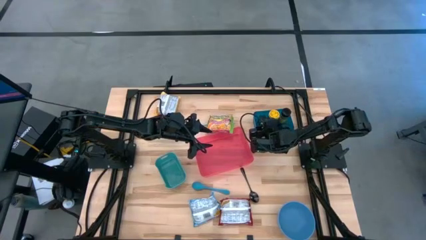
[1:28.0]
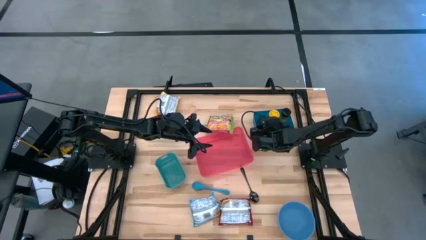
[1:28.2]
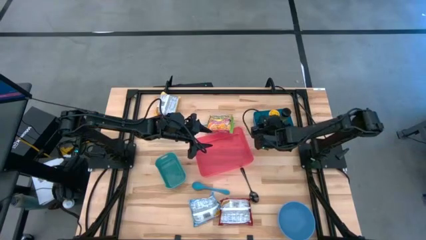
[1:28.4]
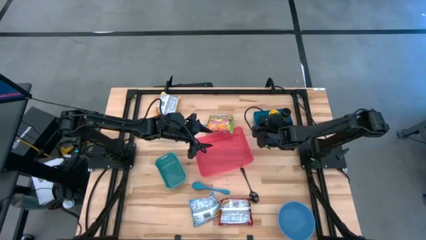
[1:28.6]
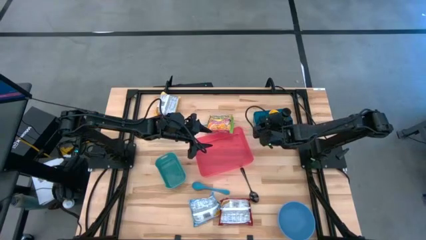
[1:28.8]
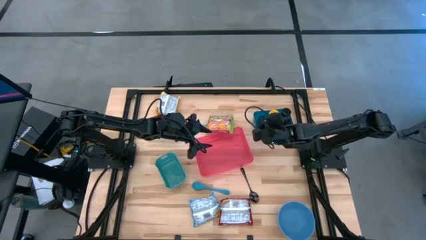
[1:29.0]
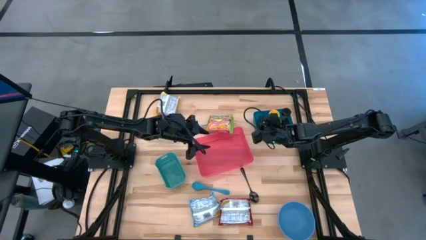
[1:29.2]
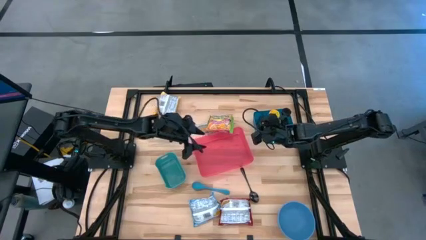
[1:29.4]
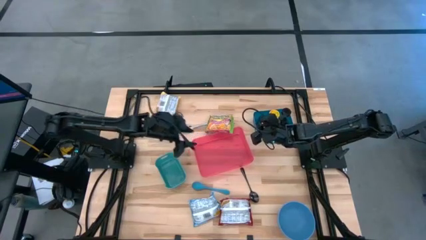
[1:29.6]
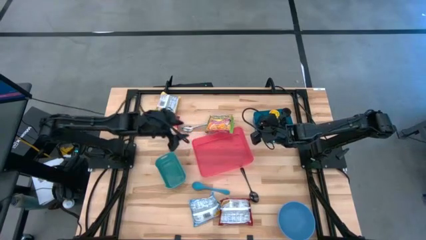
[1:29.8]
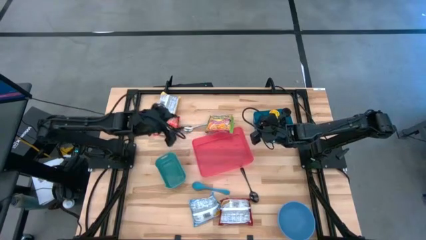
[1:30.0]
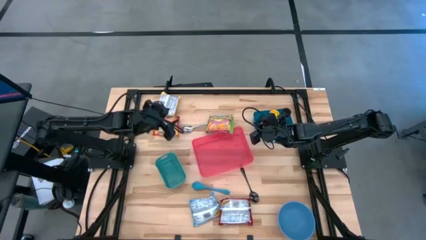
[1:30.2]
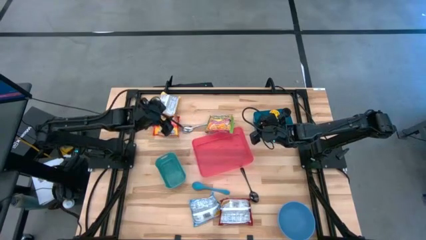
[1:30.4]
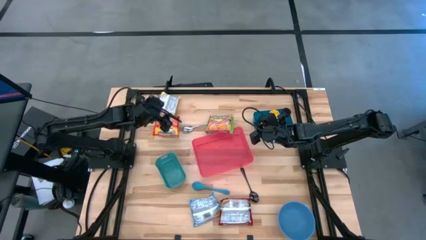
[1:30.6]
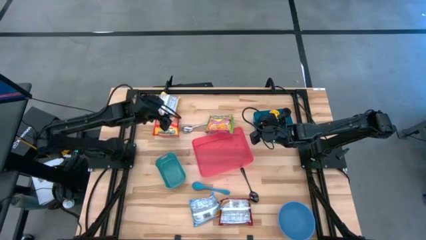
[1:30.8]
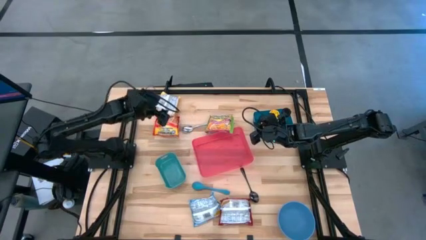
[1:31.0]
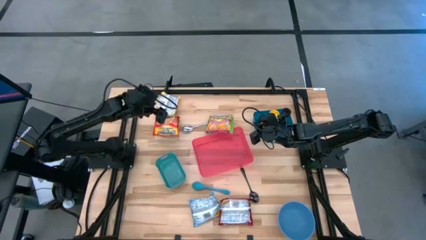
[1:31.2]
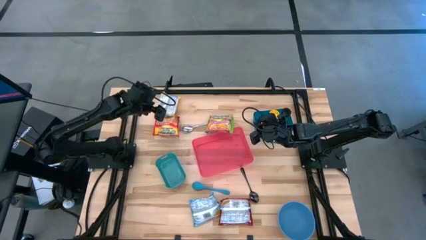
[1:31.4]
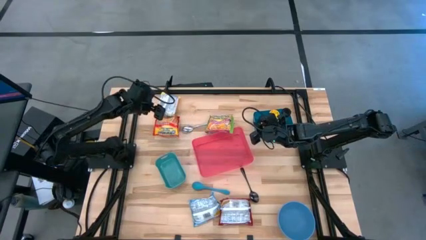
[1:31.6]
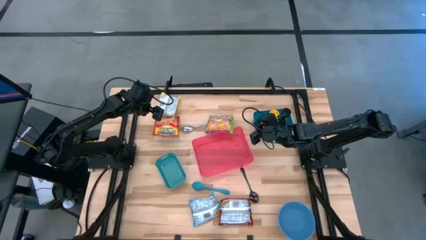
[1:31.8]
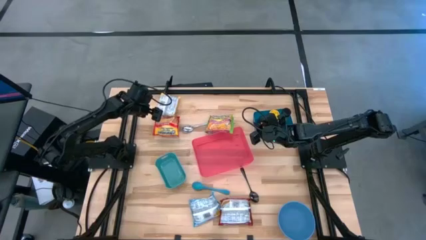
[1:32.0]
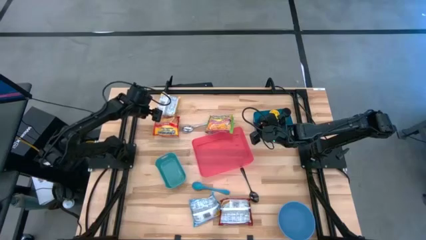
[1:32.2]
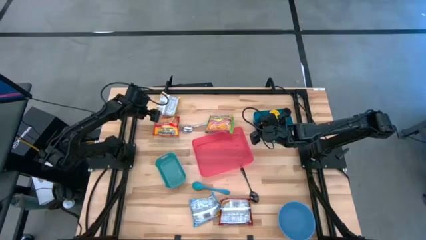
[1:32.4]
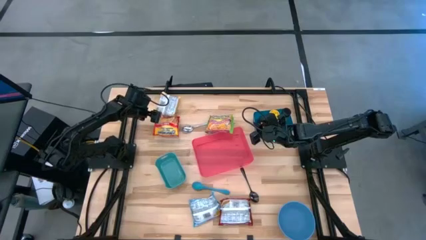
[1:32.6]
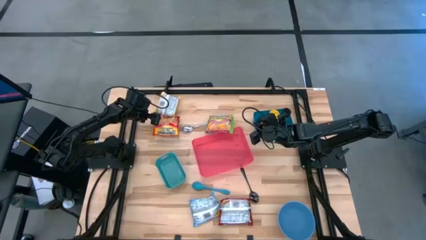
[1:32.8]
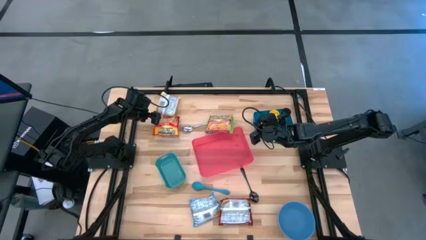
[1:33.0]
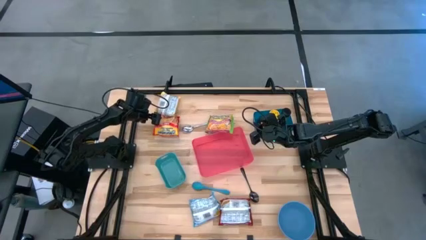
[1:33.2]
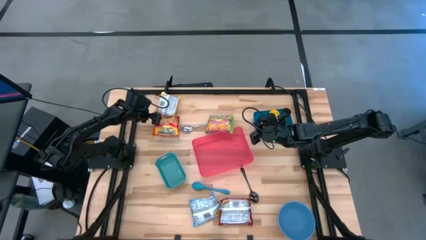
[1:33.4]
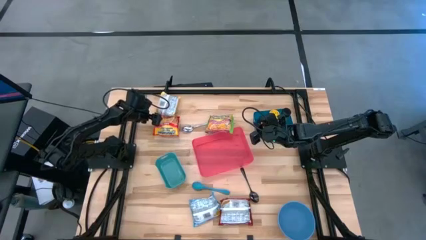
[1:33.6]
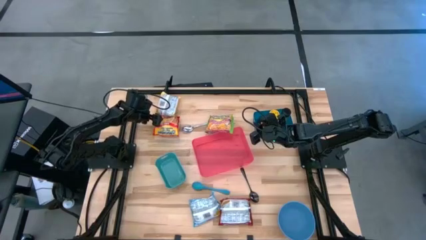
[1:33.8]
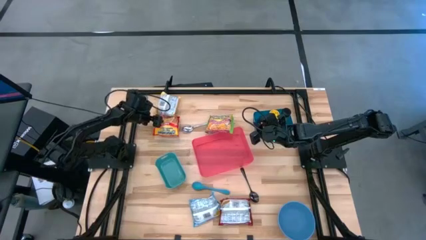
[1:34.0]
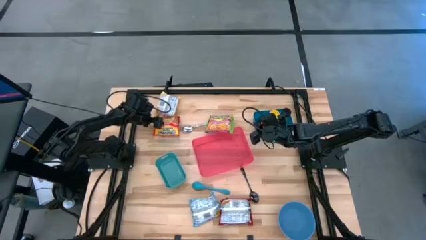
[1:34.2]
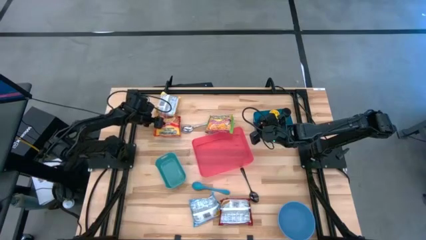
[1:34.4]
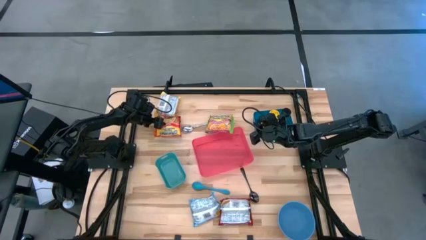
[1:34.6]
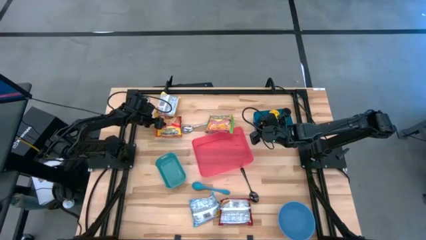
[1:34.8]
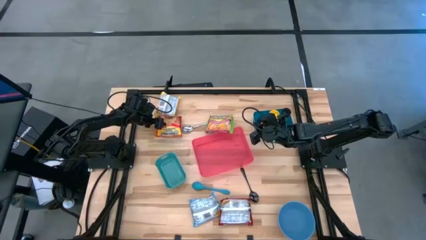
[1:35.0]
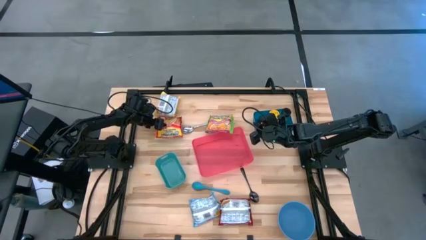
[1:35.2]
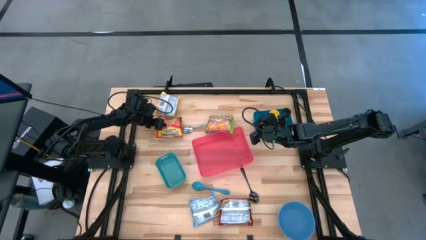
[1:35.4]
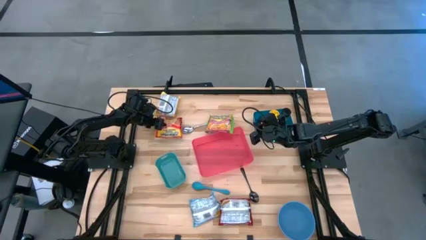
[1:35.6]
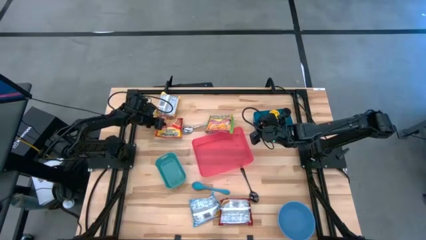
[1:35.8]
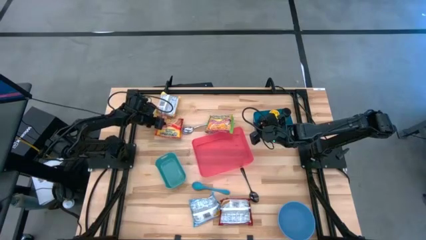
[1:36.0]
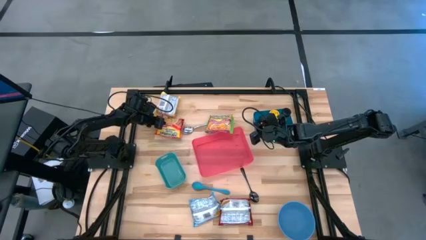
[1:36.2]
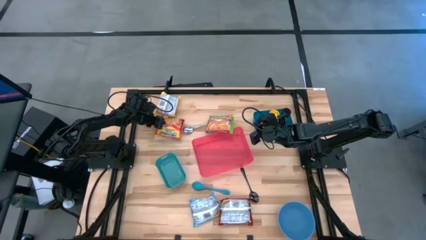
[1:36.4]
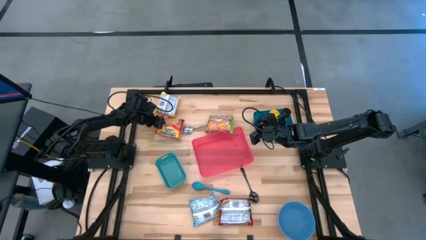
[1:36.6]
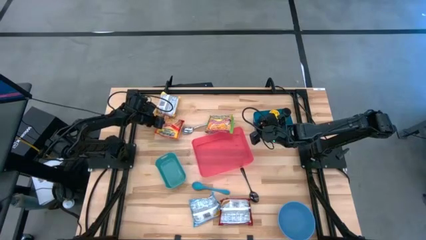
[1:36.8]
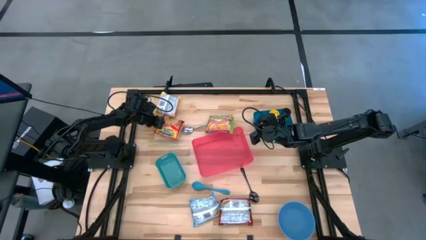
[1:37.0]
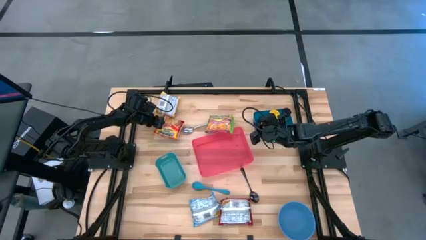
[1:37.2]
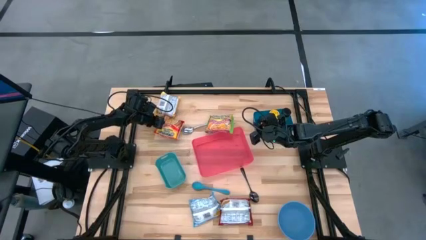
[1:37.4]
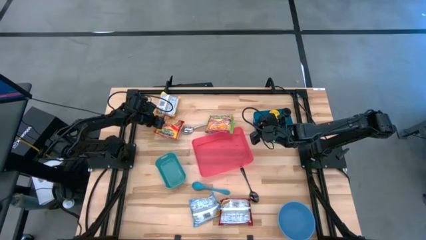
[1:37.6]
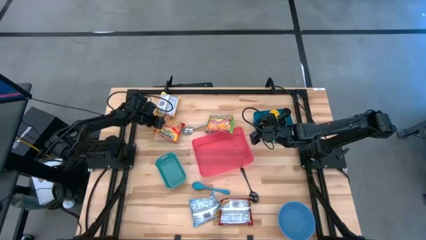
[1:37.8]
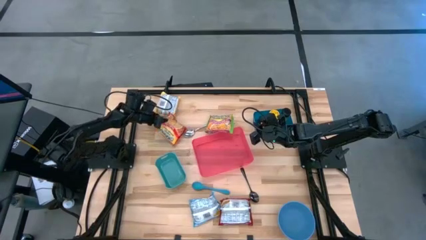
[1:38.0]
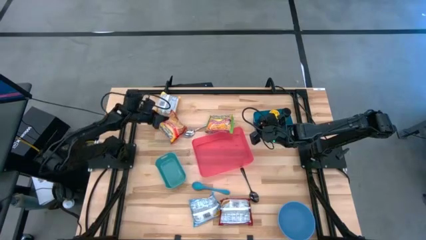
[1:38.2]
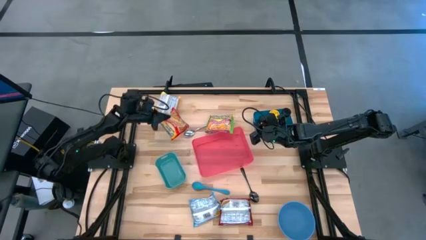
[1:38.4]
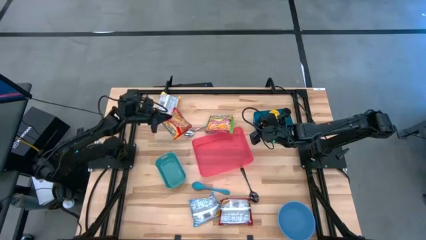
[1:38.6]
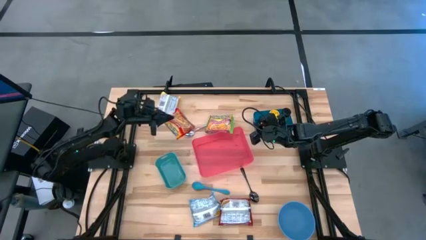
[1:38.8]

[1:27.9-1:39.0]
Task: Pick & Place Food Item
Put the orange noodle pack into the red bin
